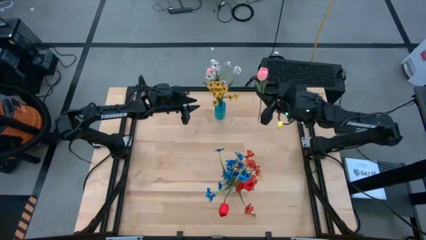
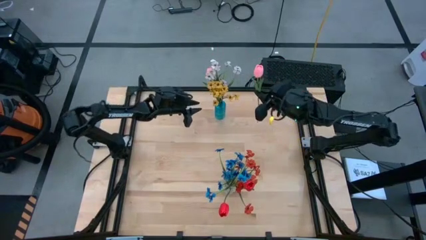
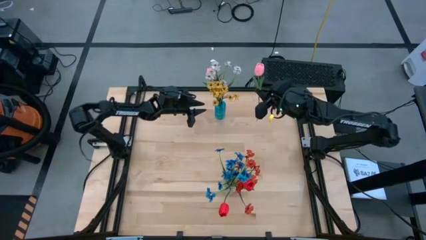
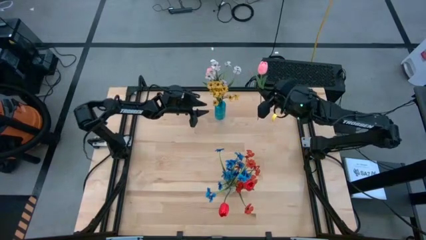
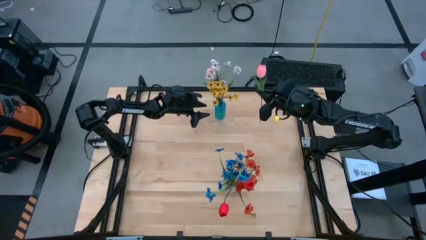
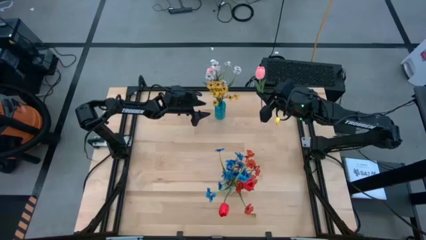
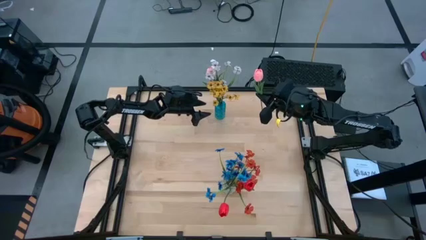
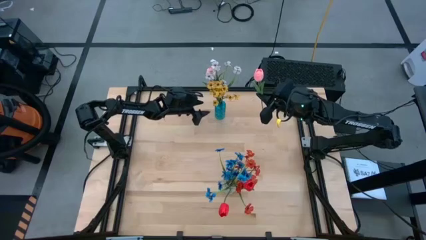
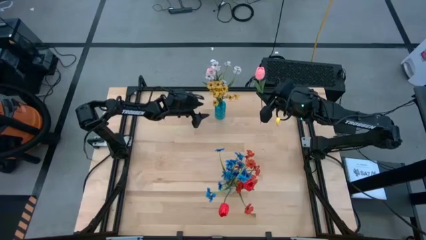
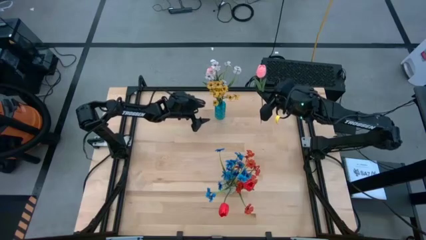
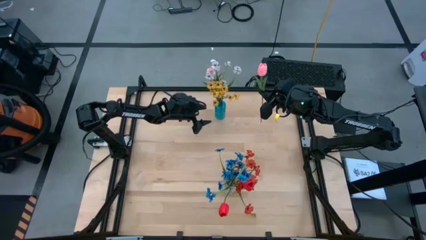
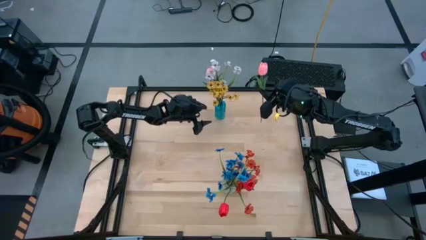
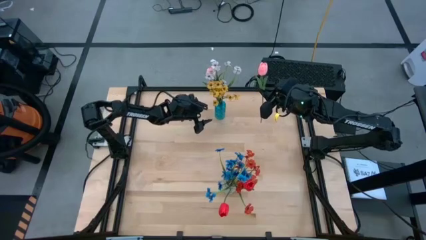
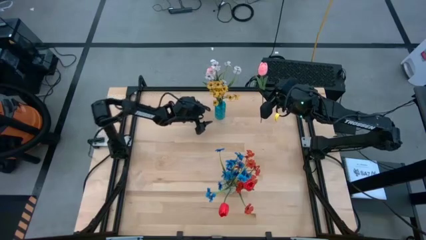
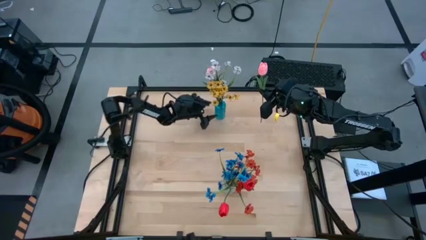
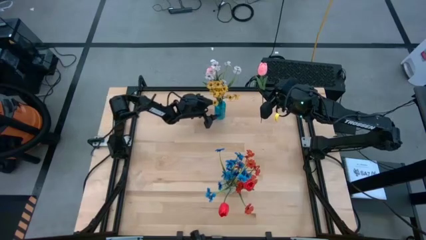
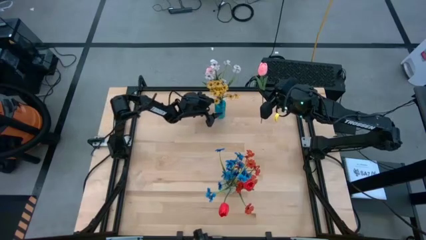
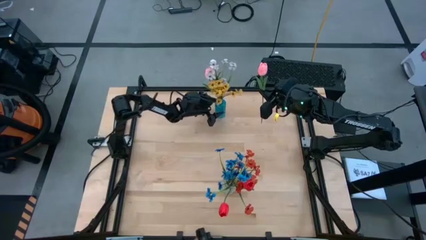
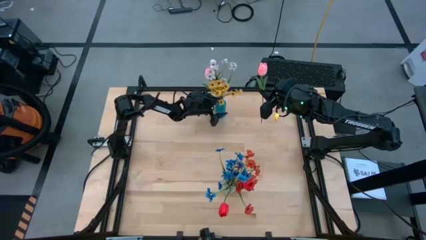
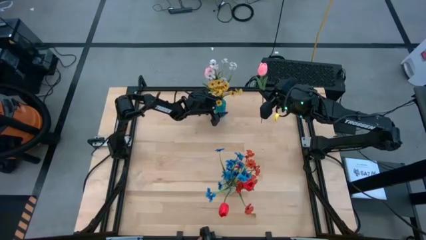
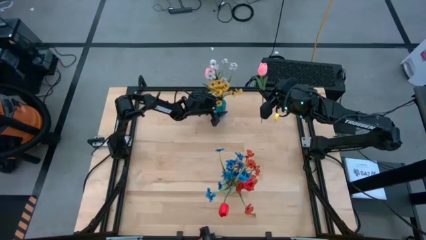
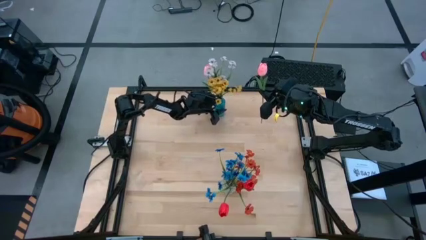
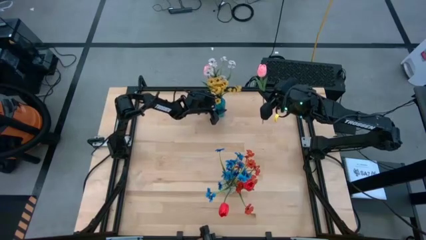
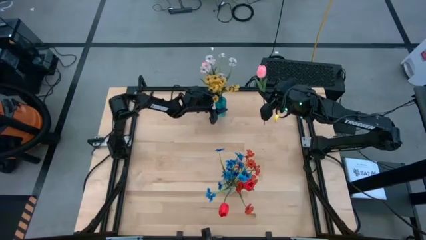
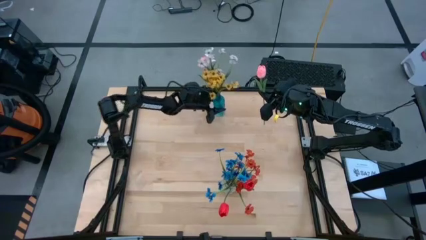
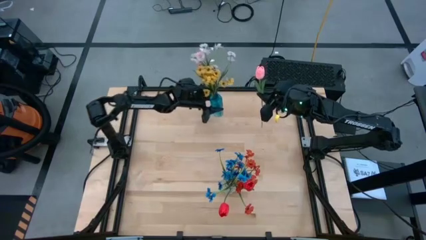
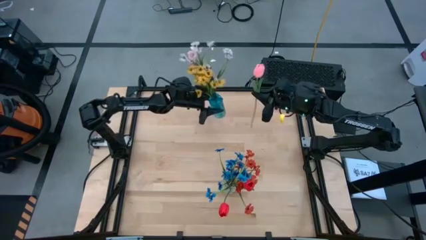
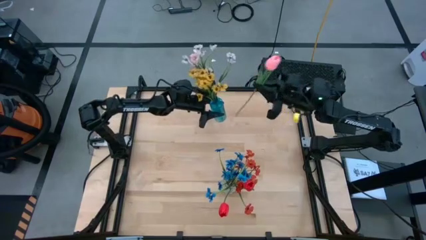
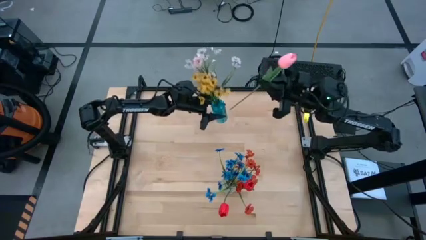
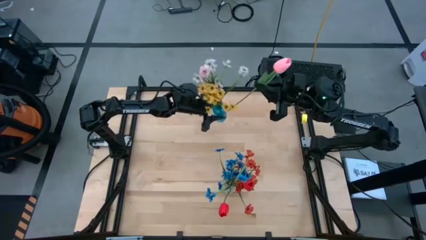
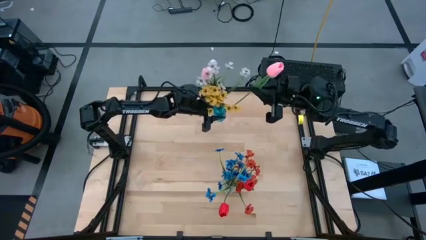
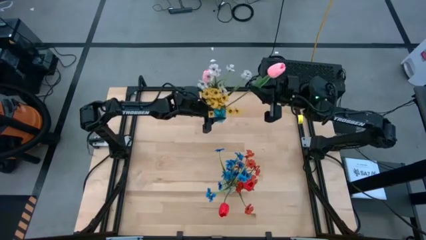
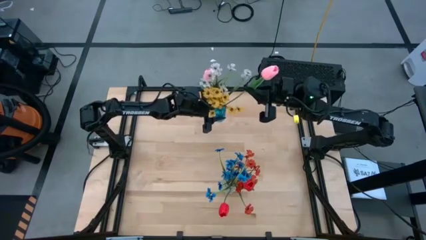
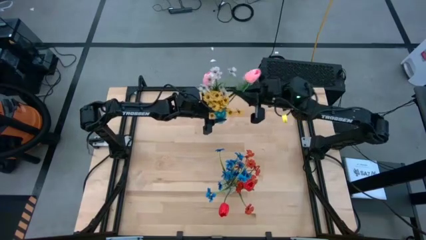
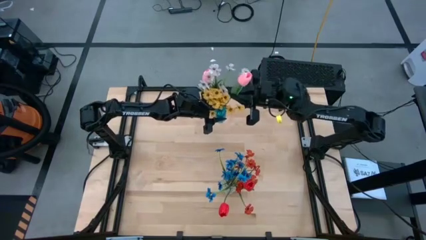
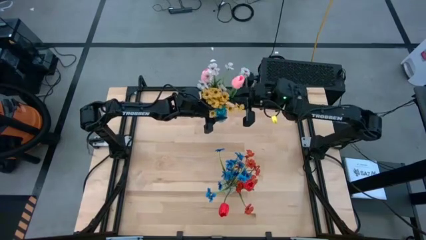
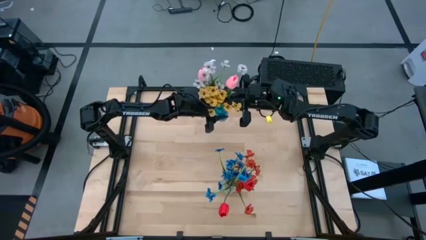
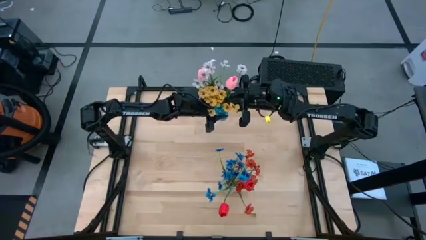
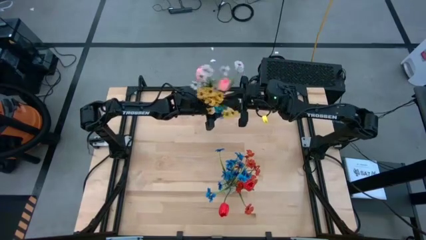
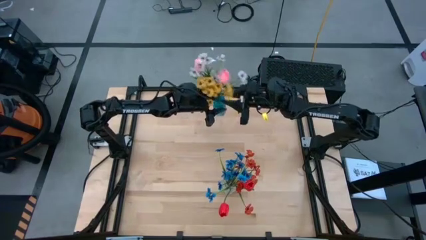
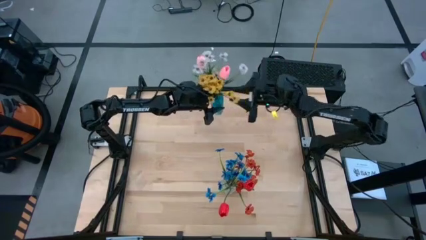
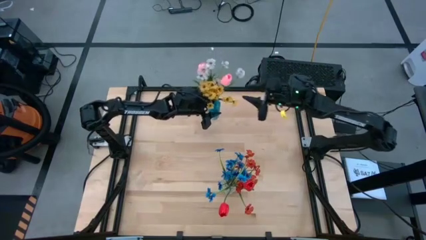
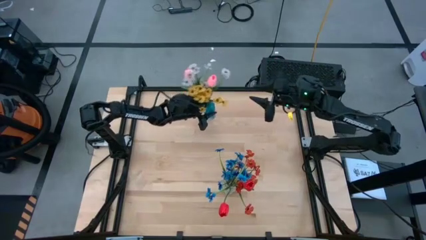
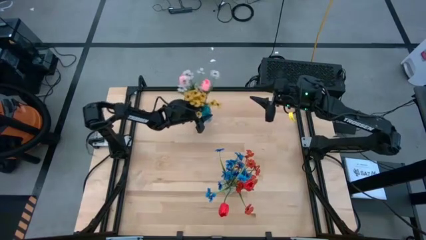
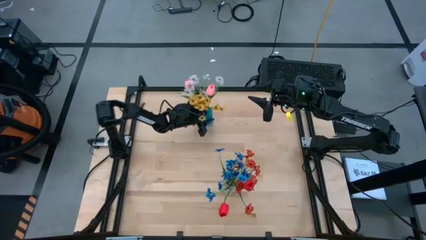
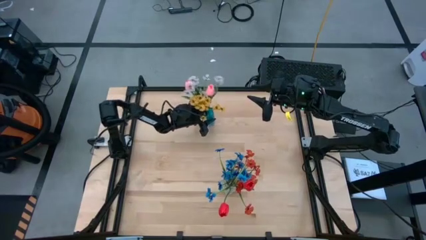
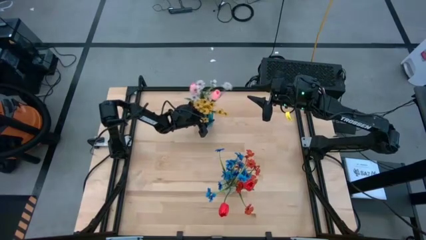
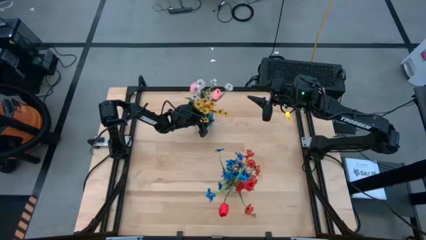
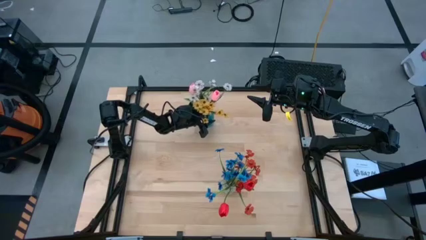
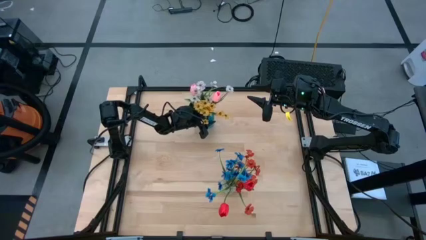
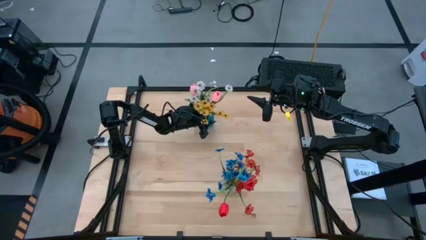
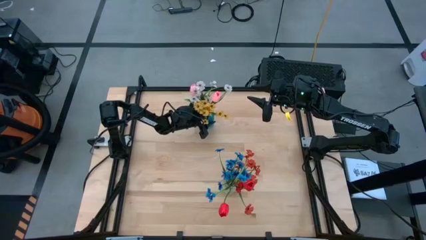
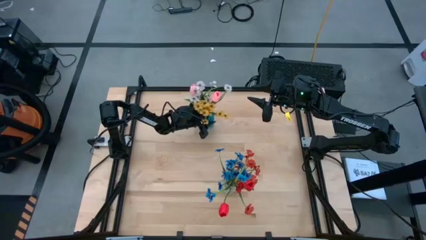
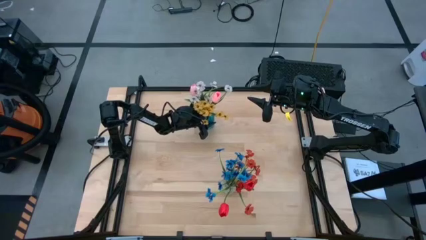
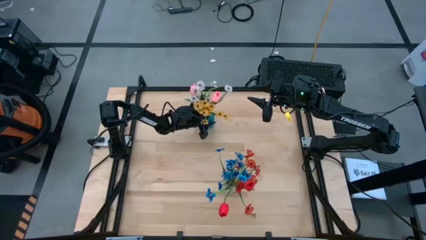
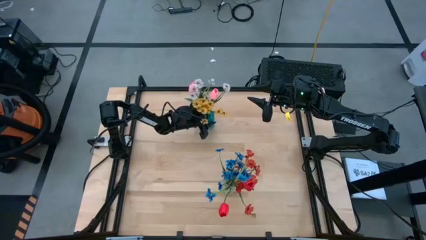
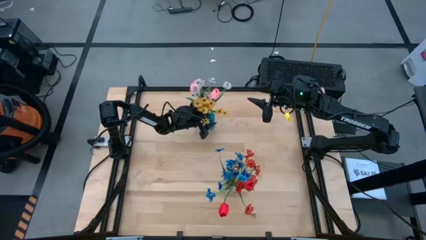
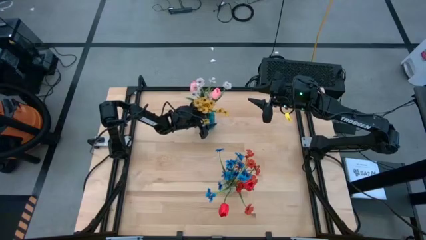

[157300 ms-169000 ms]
Task: Sort flowers into vase by color
Put the pink tulip into the blue vase
